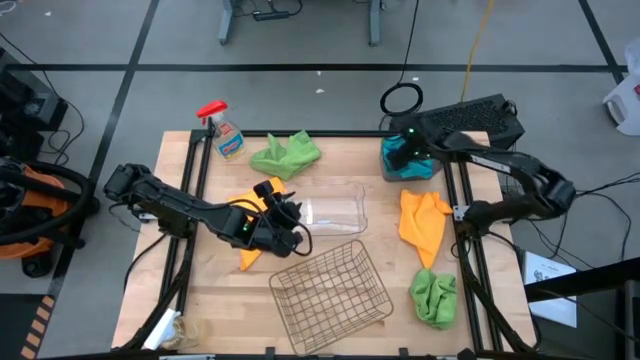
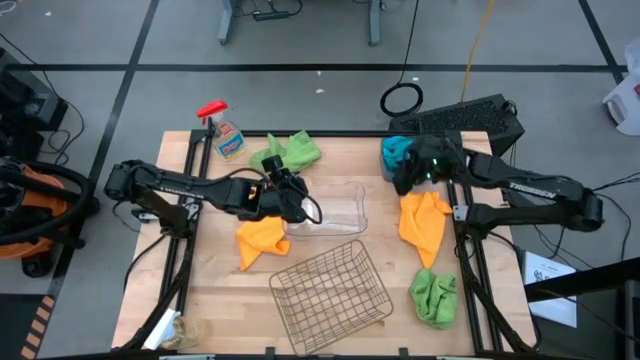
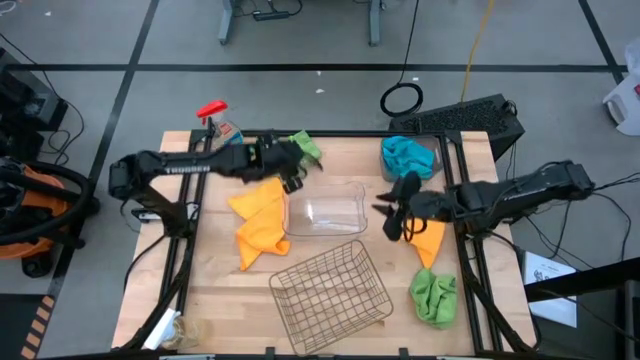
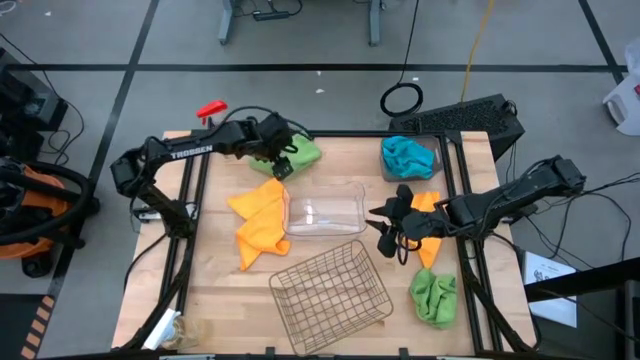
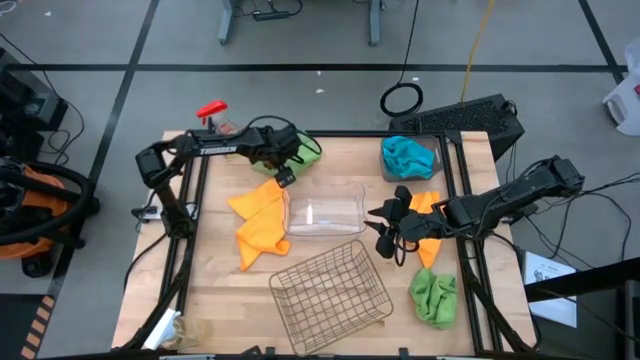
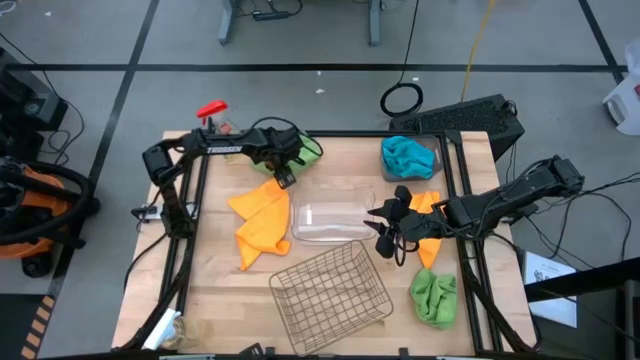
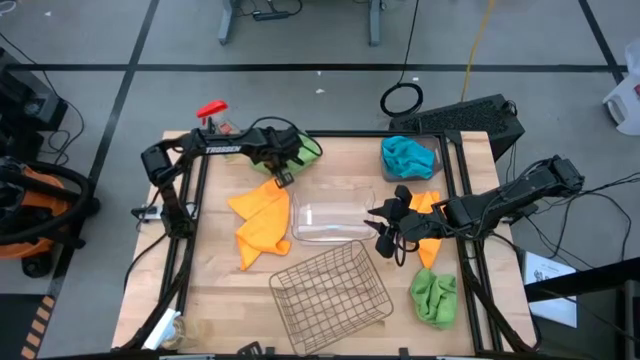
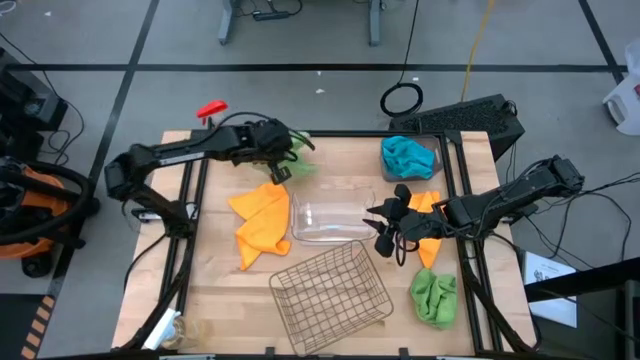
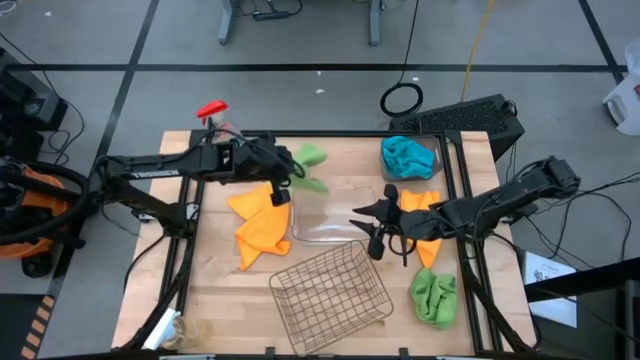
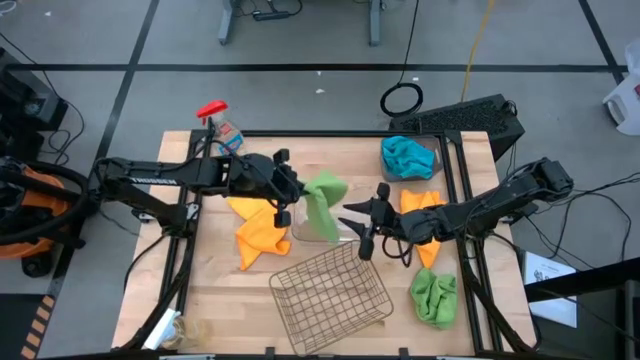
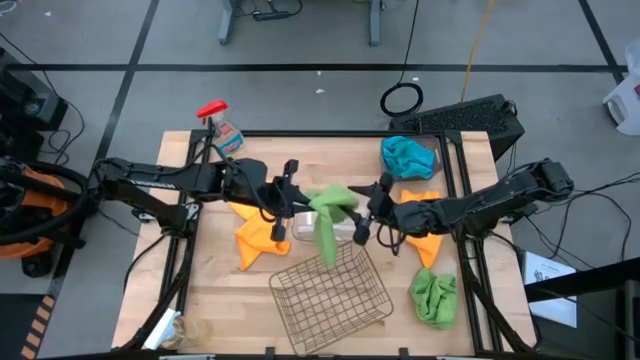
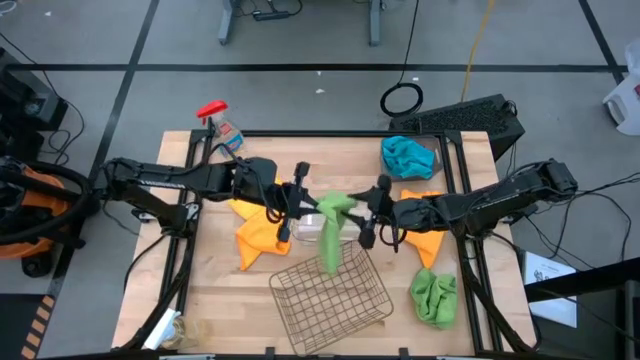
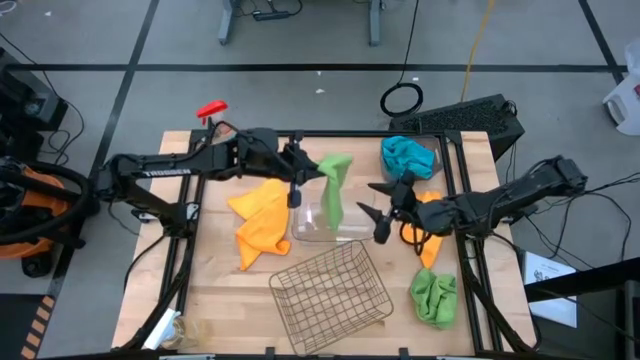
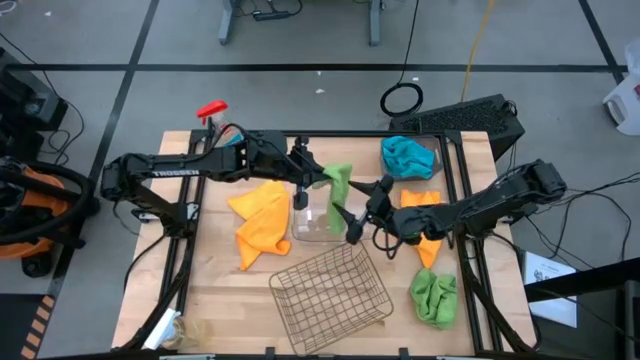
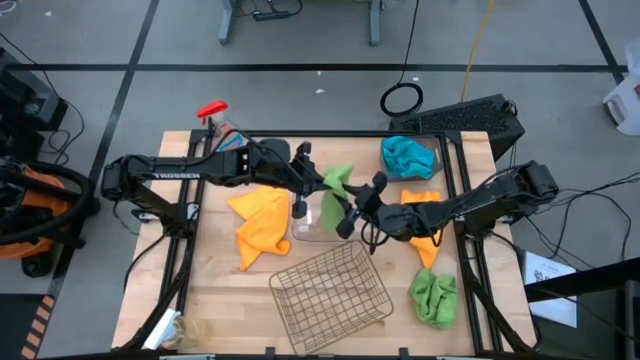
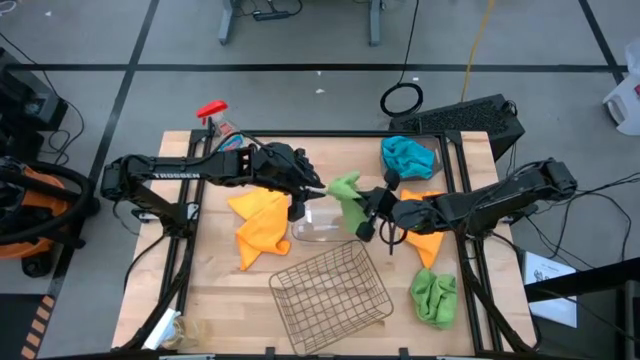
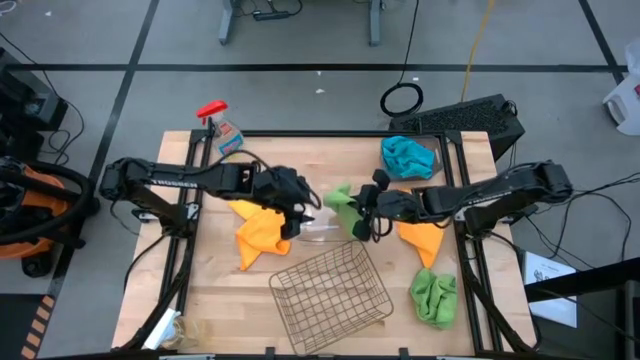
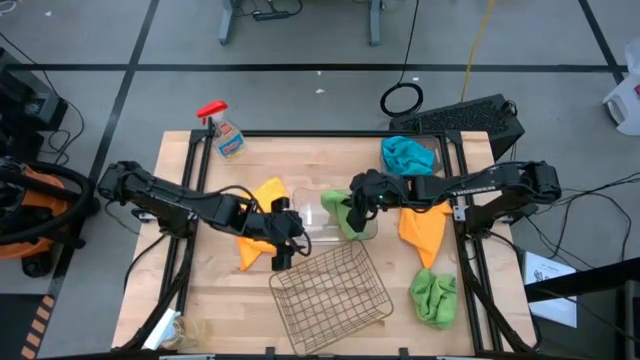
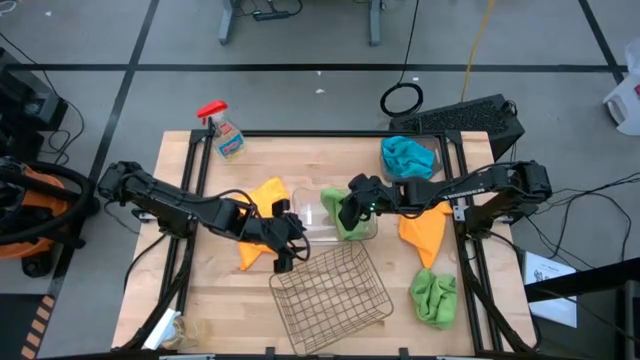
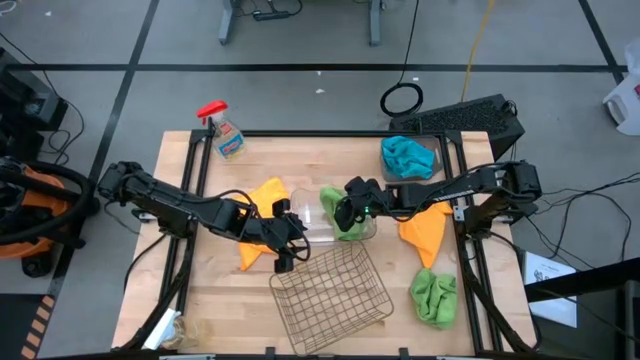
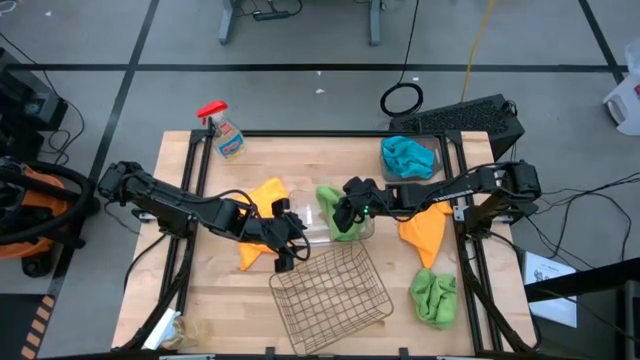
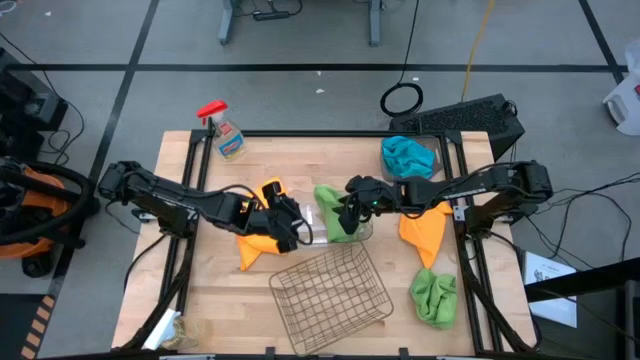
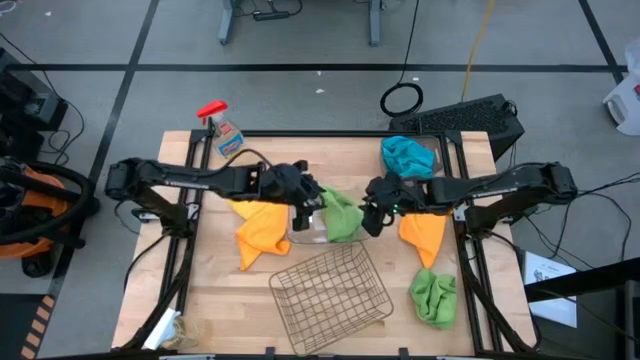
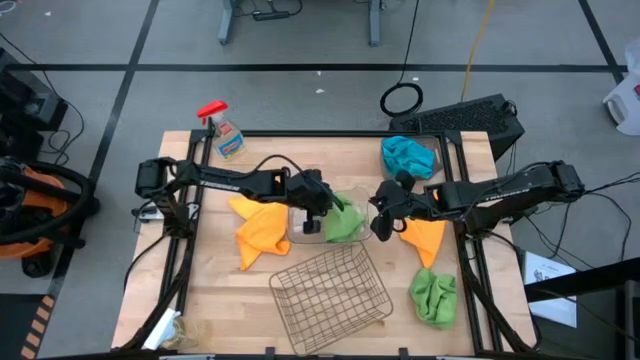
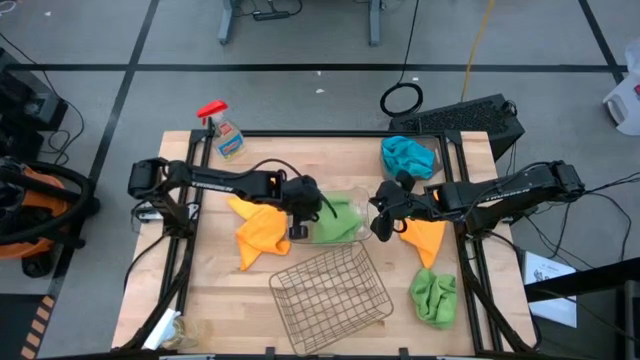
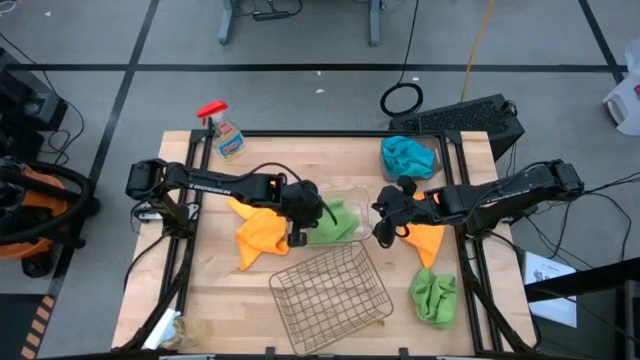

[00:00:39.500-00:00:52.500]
Task: Sort microfiber towel by color & place in baskets
Put the top green microfiber cloth into the transparent bin

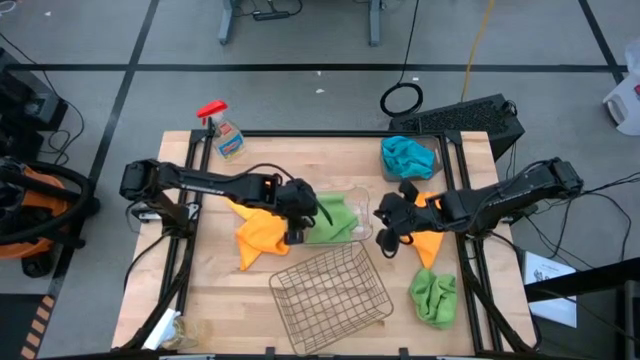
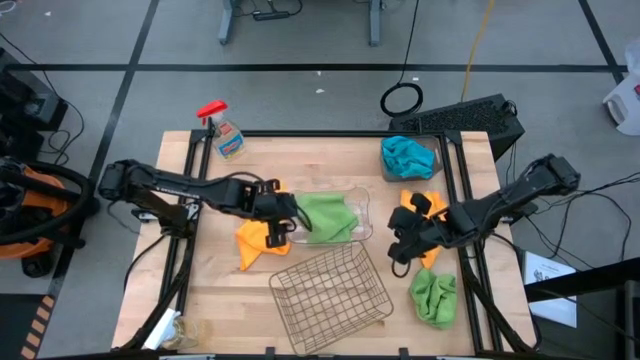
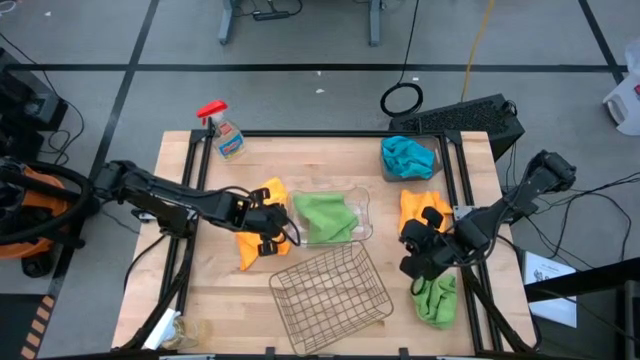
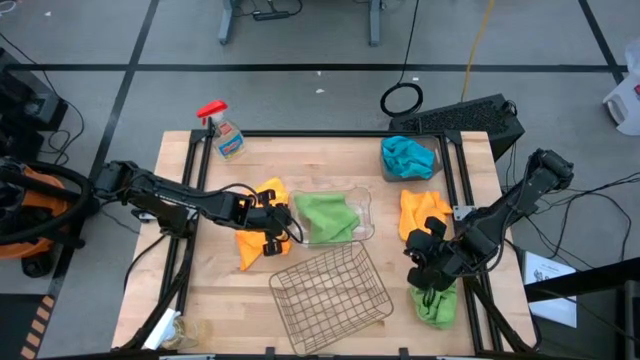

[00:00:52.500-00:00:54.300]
Adjust the transparent bin

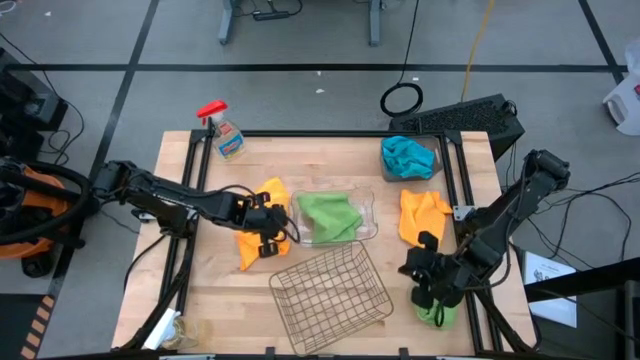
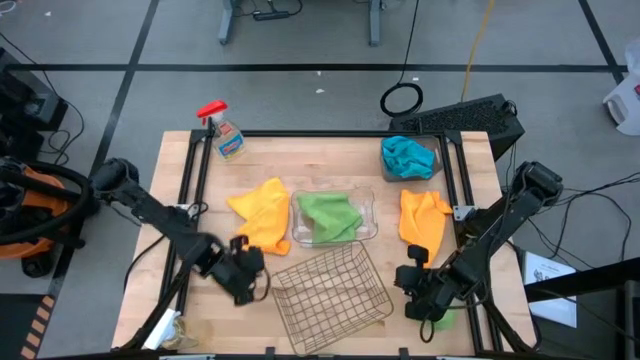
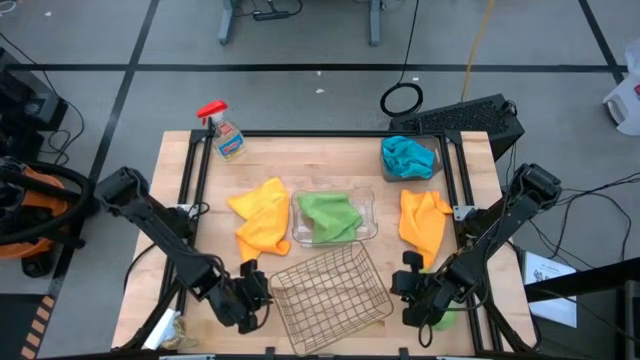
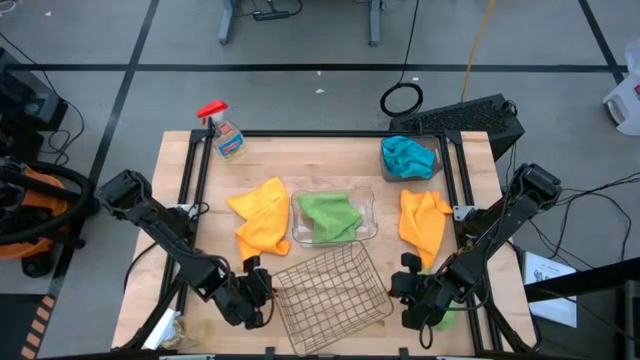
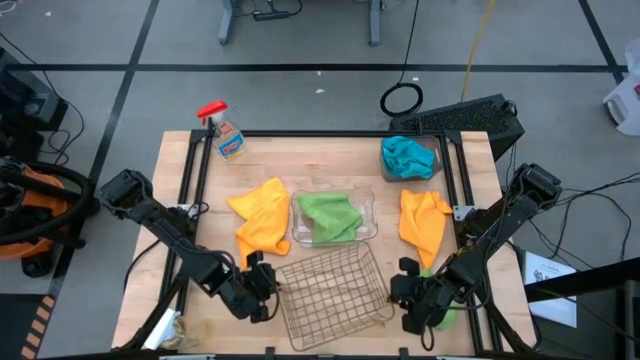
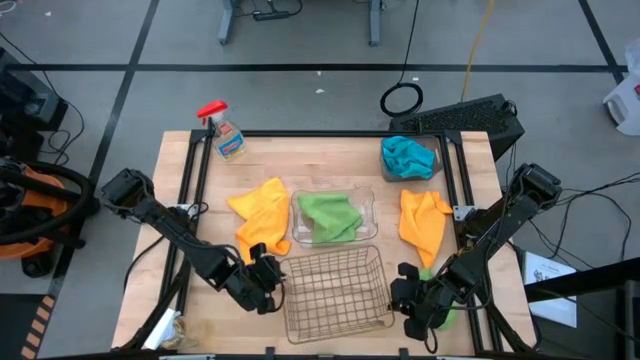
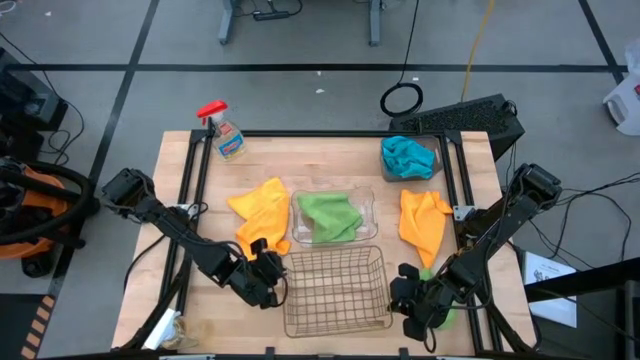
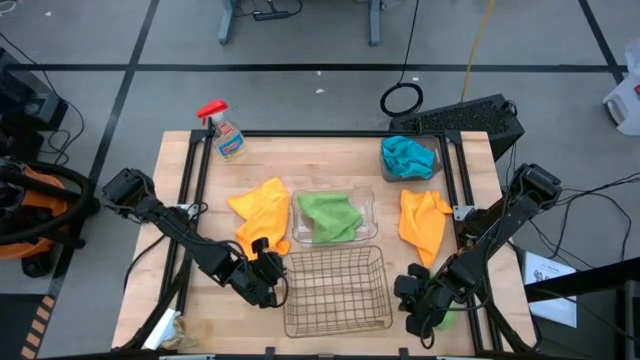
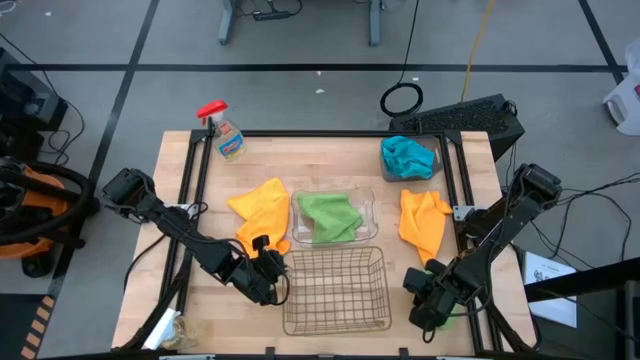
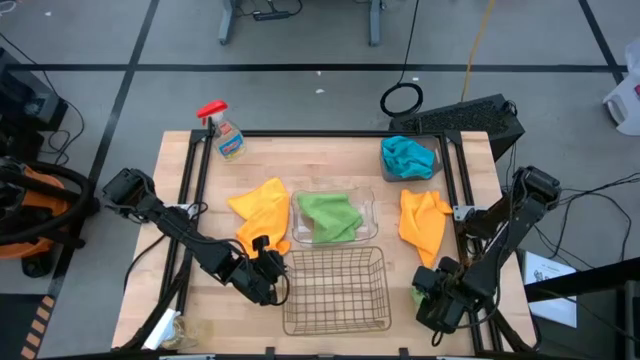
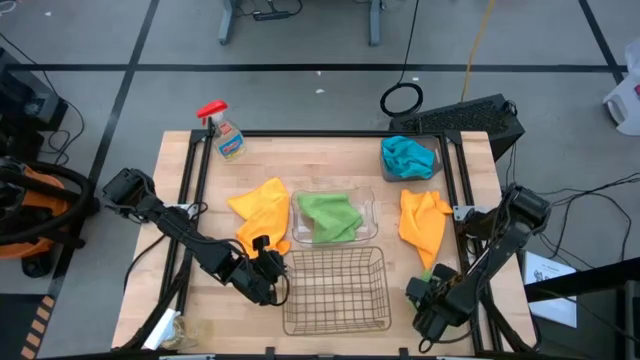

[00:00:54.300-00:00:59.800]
Adjust the golden wire basket

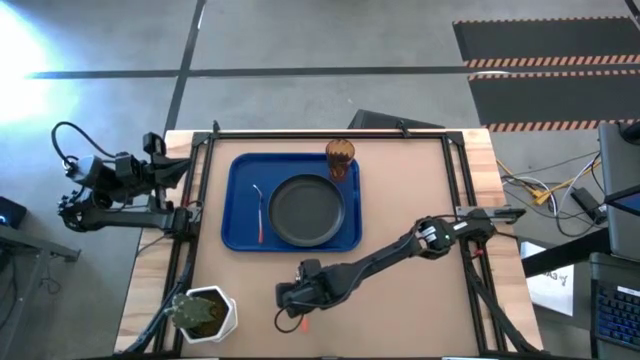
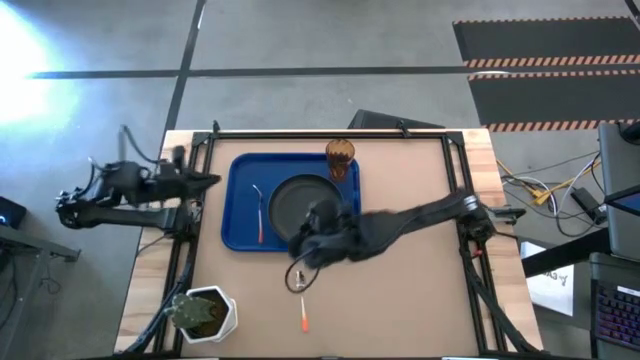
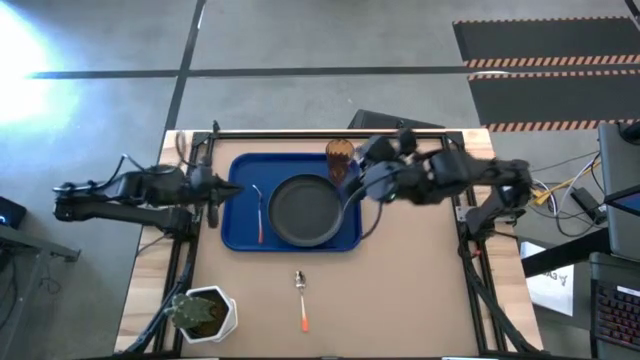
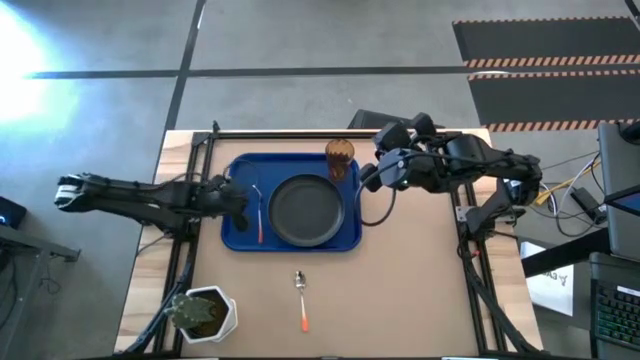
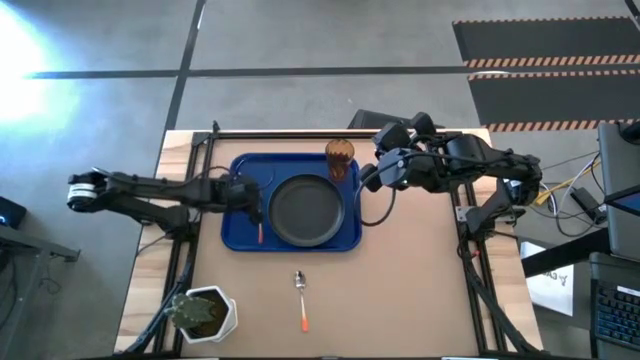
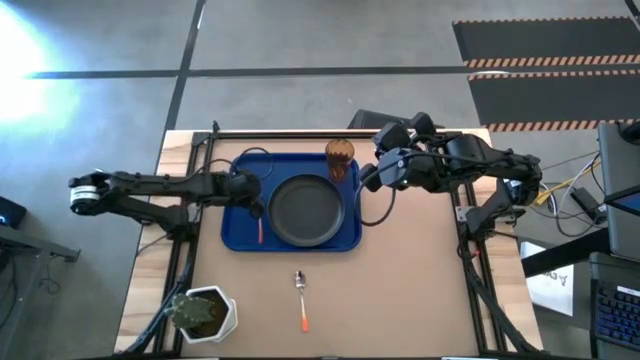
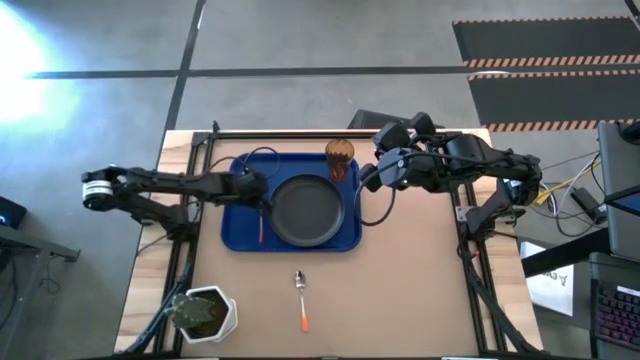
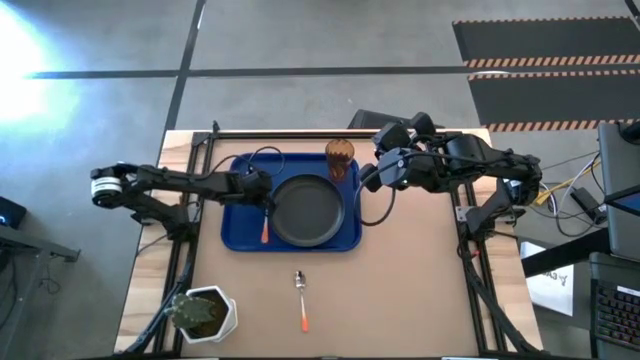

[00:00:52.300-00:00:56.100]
Task: Pick and place plate/cup/fork/spoon on tray
Adjust the orange fork on the blue tray
